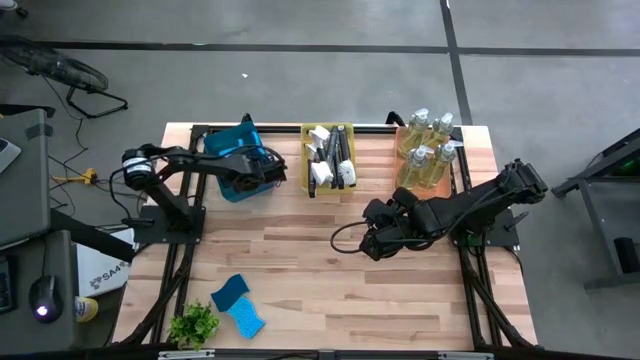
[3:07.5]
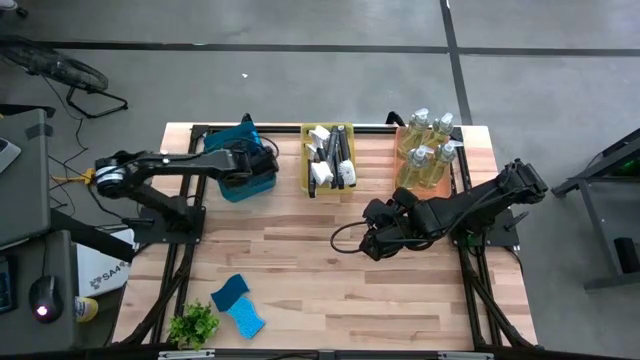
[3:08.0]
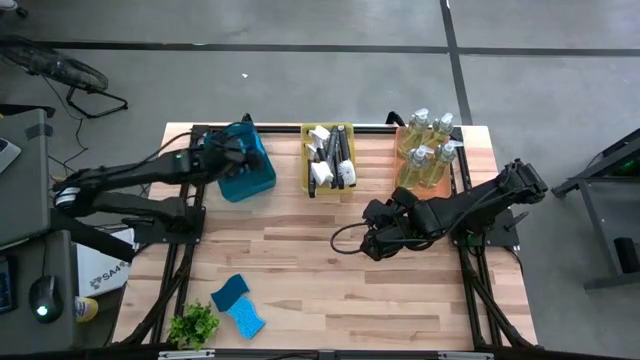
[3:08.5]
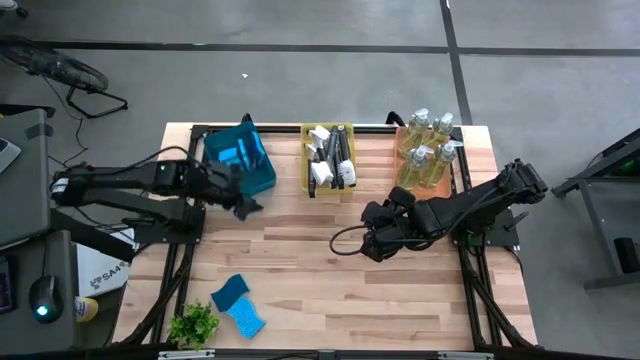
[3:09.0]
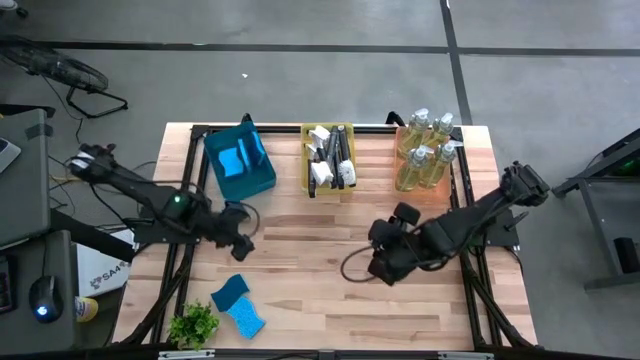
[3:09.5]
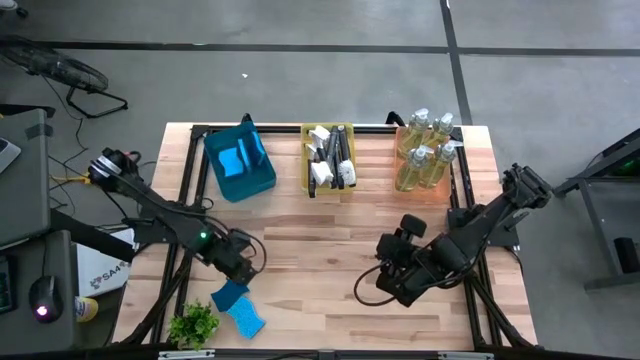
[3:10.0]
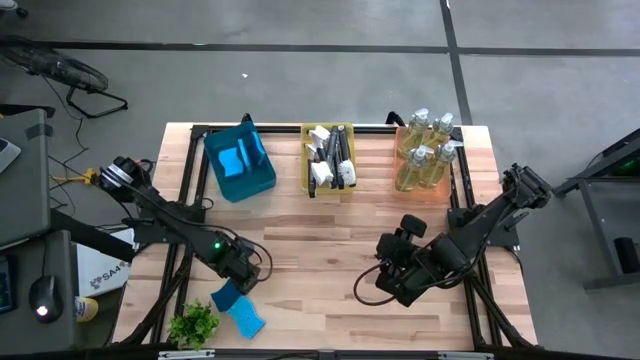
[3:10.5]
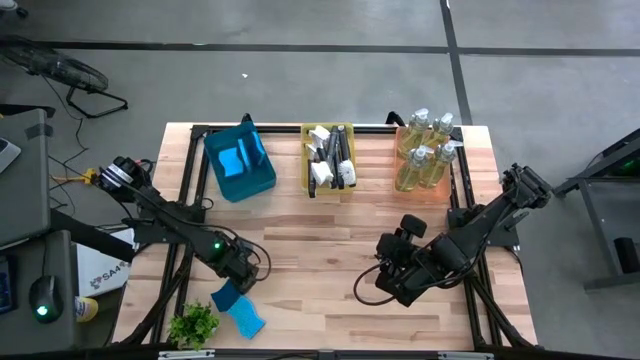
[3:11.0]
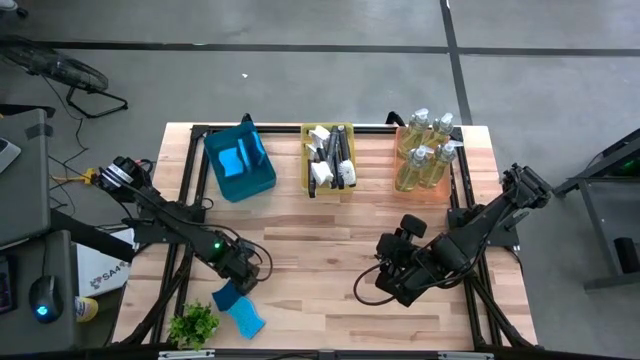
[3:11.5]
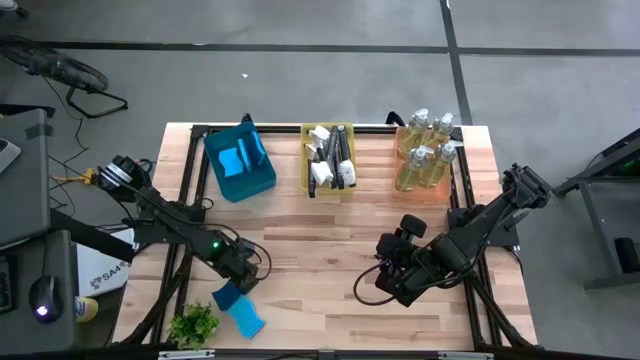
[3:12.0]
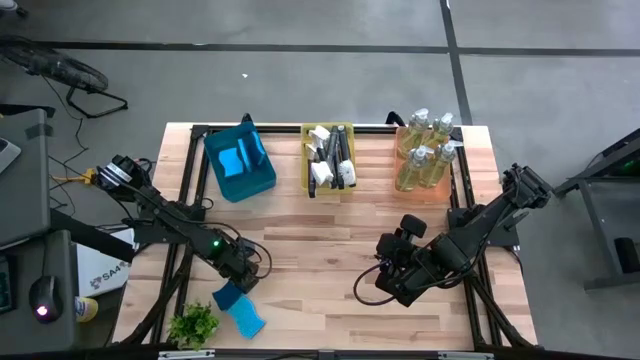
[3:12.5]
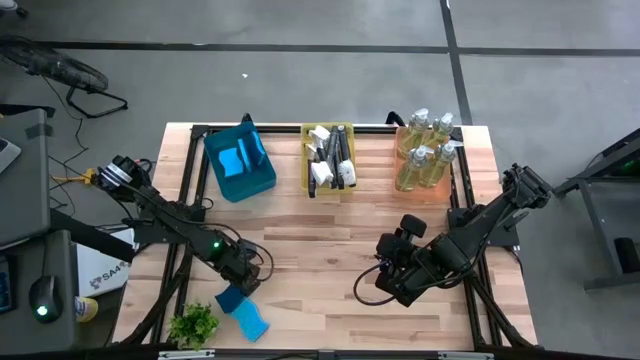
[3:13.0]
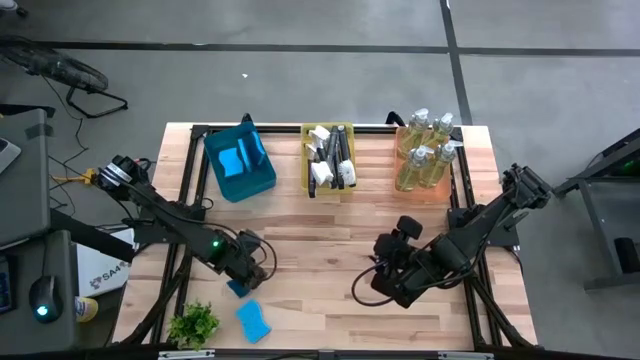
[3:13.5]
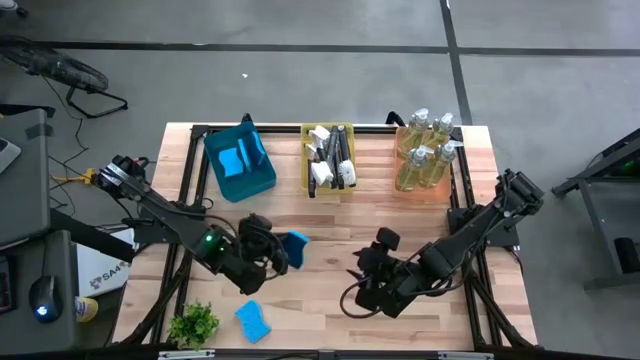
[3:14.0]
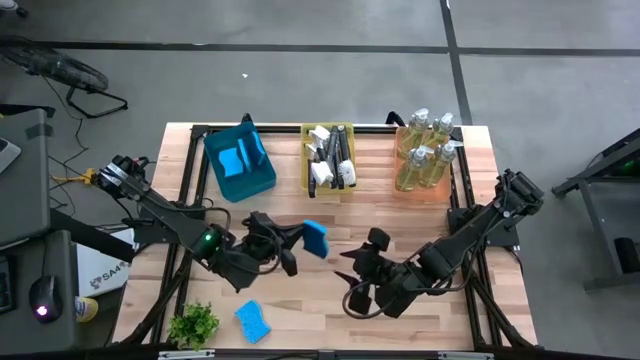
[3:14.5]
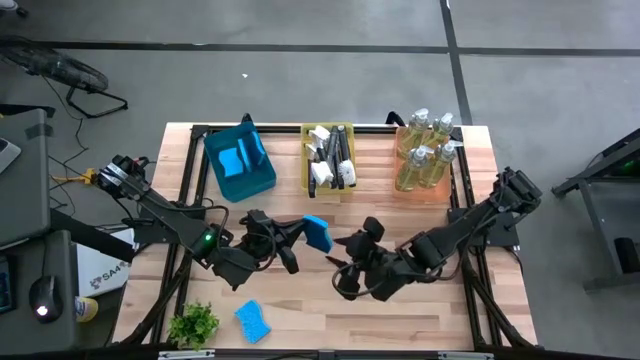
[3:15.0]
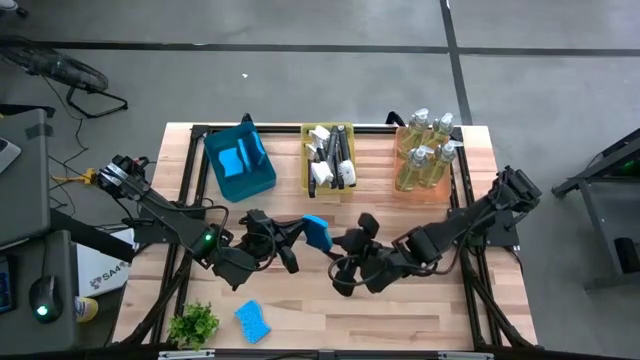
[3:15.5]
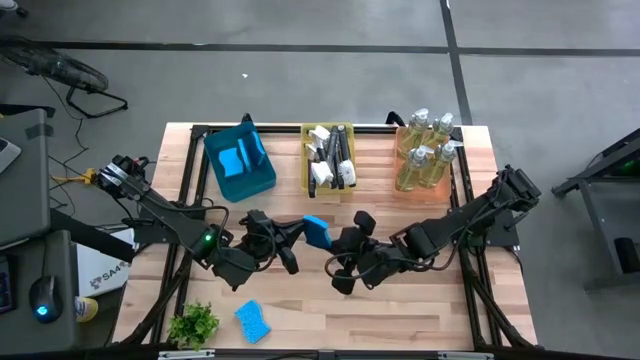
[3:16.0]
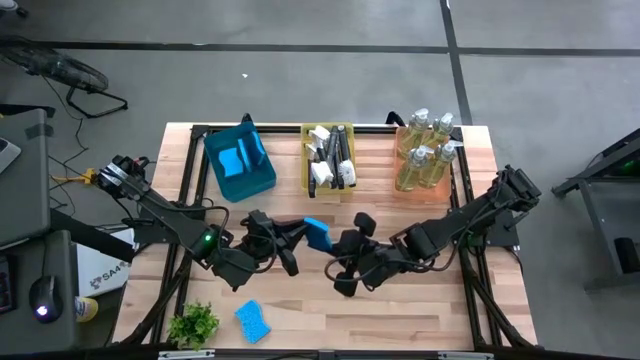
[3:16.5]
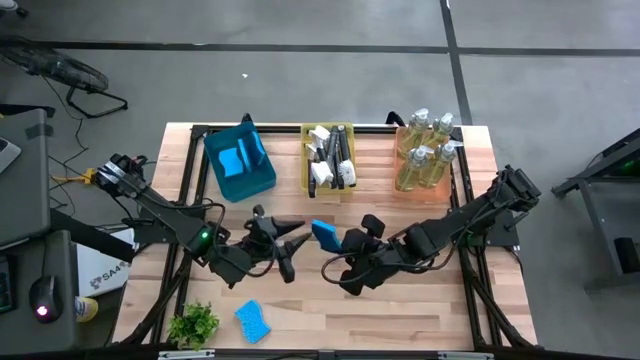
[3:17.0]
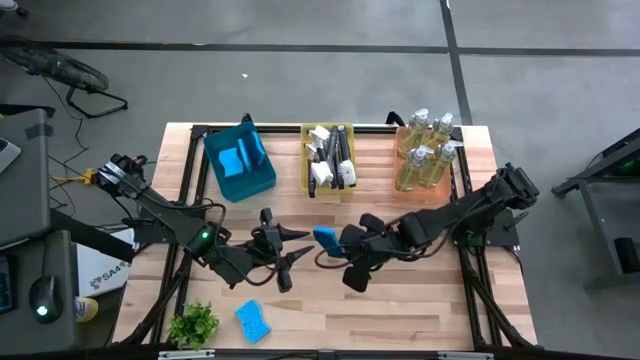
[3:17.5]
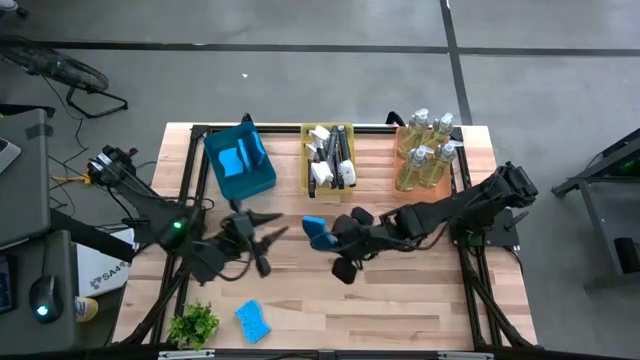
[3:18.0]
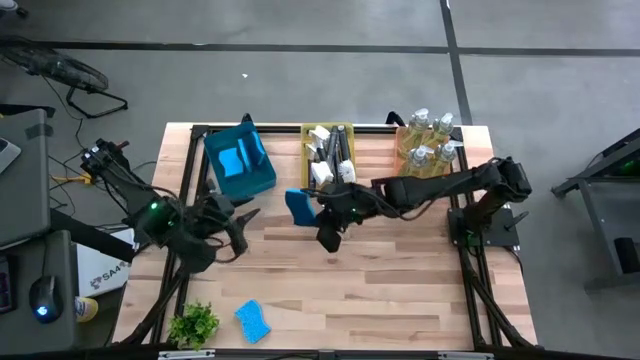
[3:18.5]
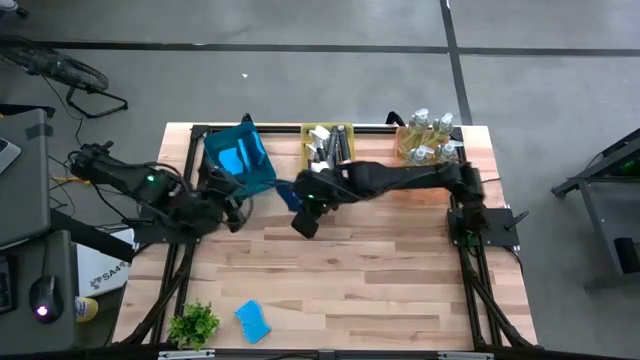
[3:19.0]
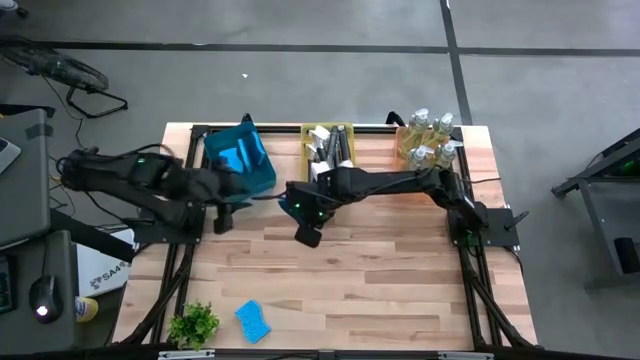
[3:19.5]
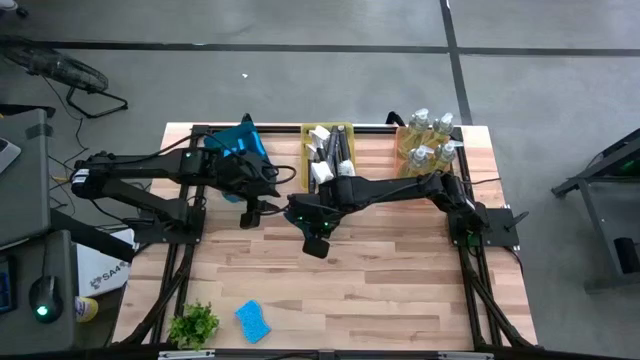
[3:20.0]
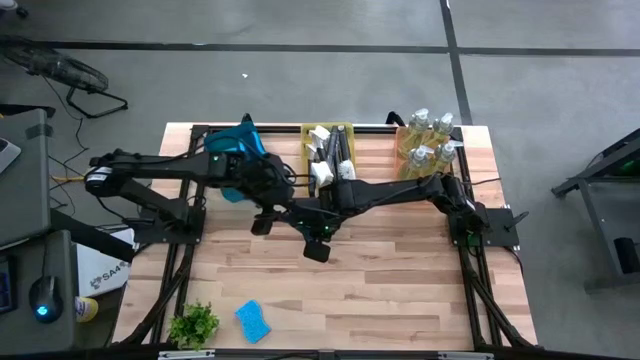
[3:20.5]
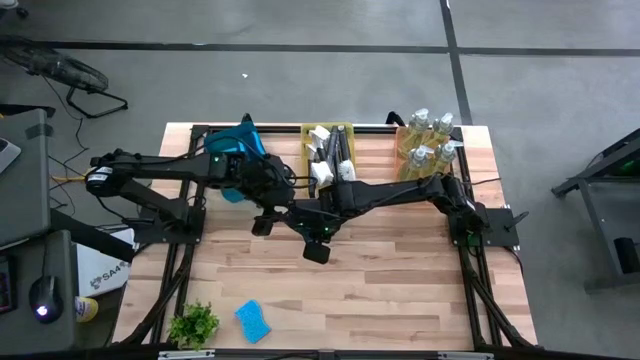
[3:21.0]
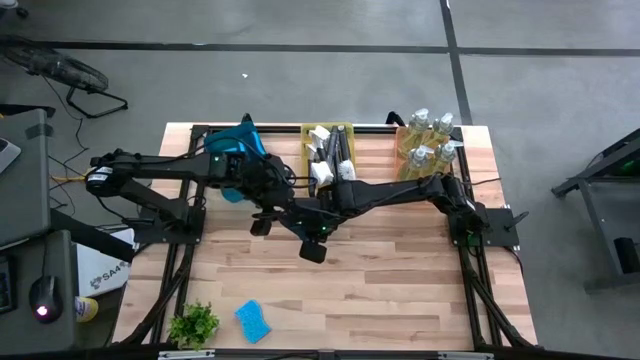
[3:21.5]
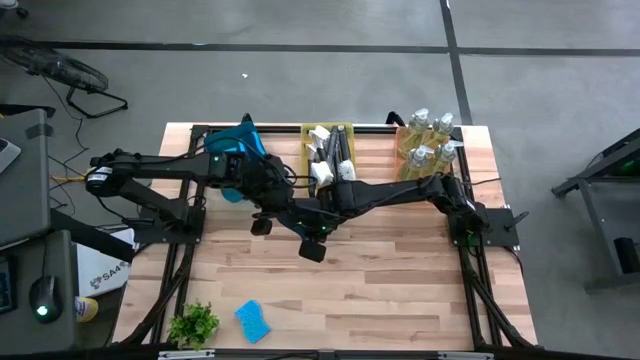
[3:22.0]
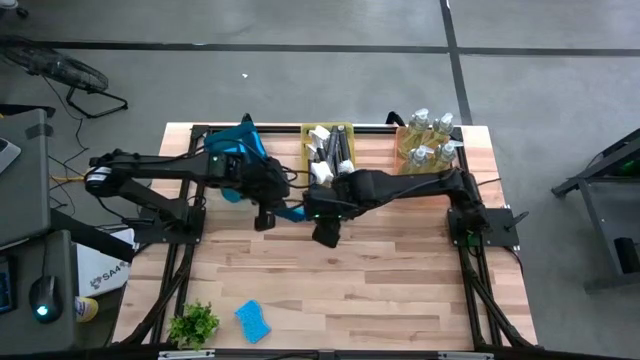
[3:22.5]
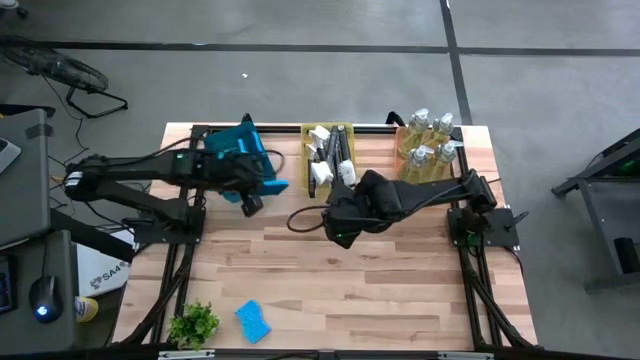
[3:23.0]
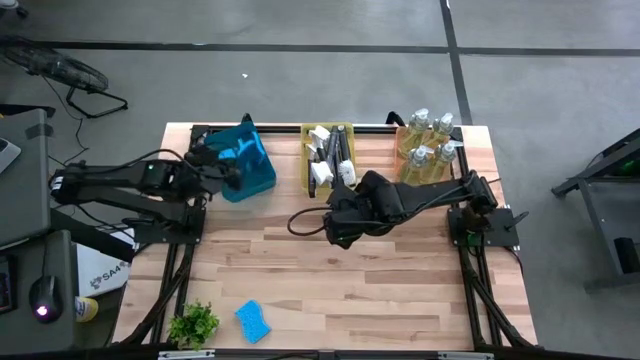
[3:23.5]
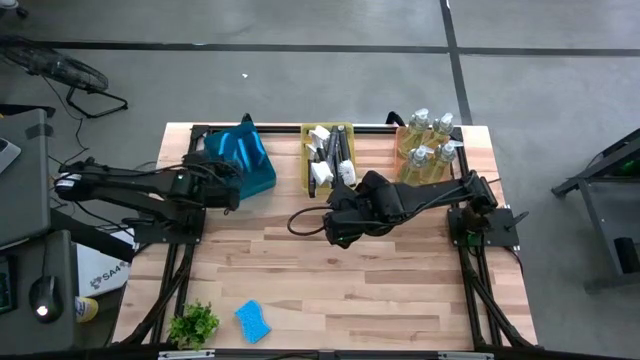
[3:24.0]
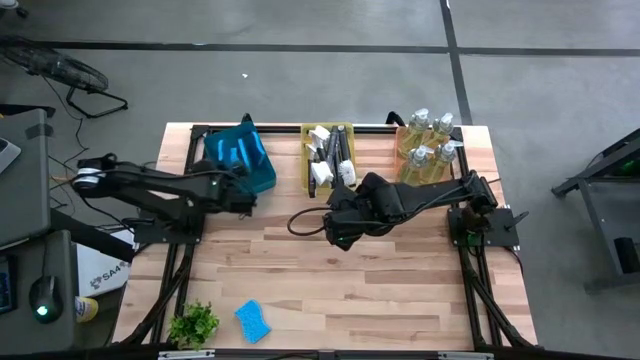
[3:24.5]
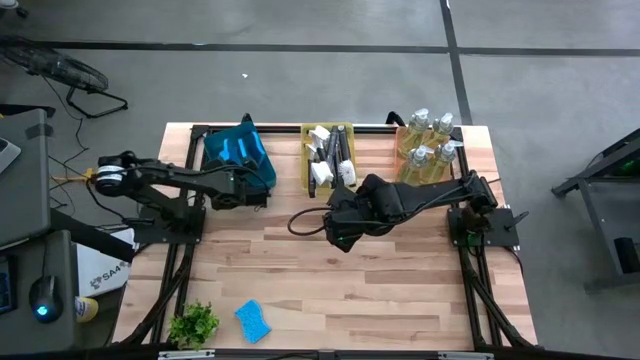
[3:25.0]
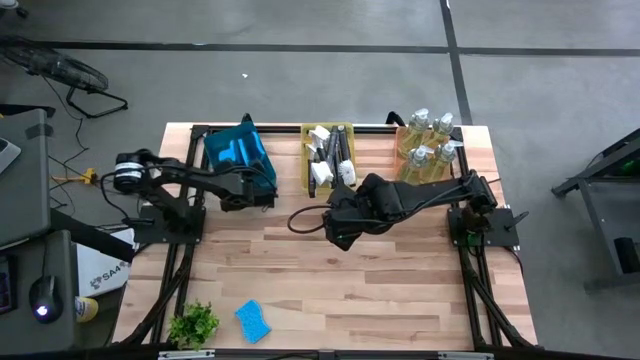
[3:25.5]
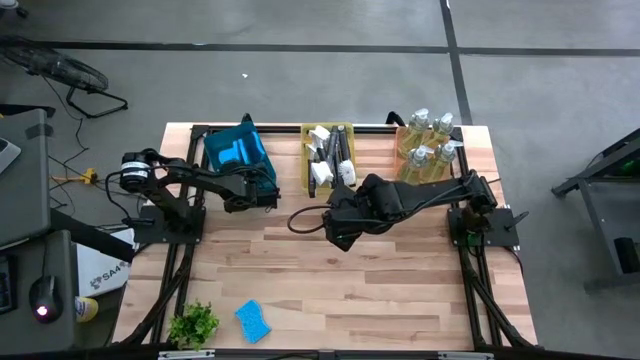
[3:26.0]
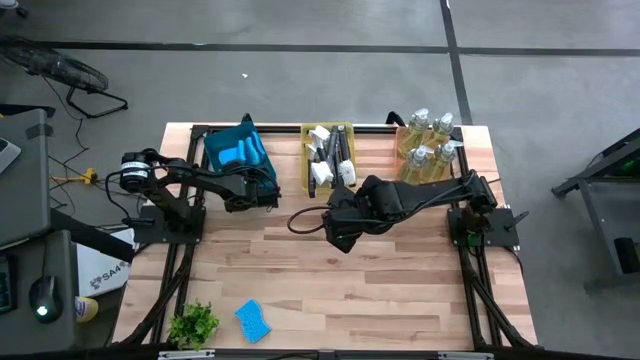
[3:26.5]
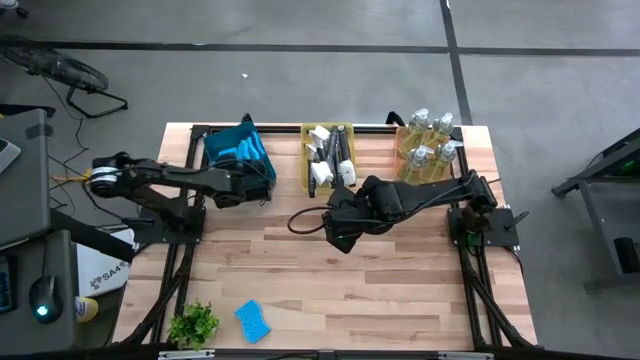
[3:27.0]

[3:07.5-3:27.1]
Task: Pick & Place Kitchen Sink Supplies
Put the blue dishwashing sponge into the blue bin
